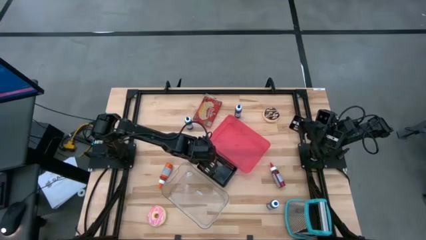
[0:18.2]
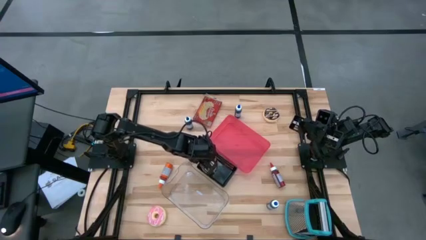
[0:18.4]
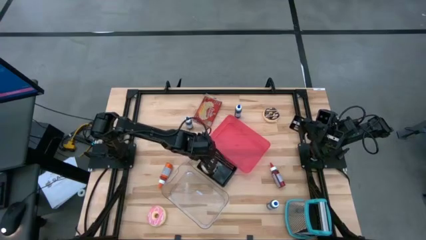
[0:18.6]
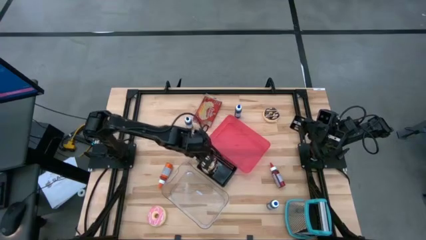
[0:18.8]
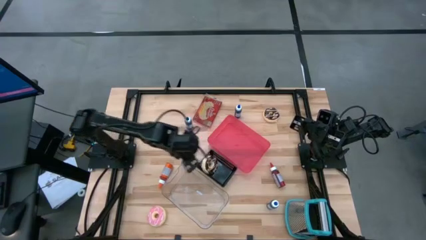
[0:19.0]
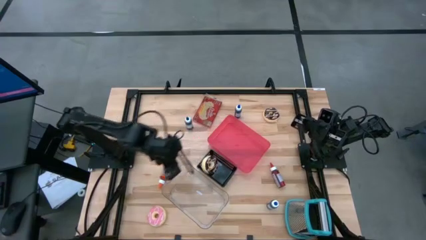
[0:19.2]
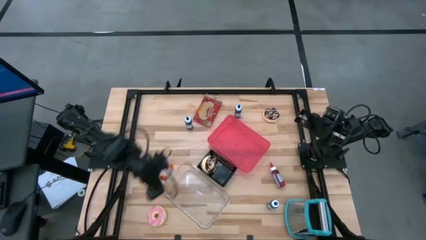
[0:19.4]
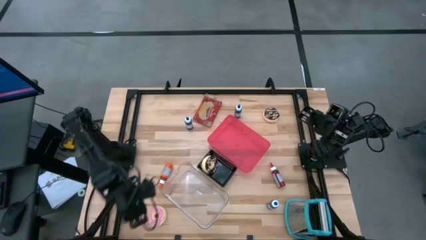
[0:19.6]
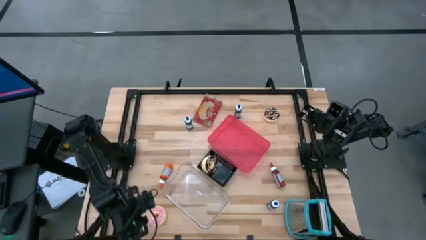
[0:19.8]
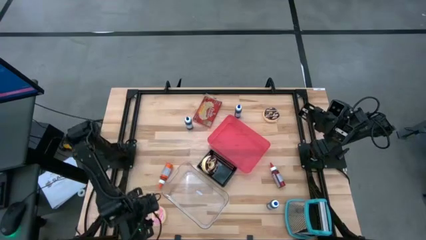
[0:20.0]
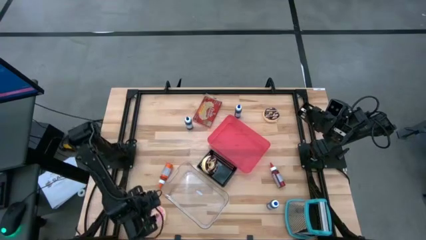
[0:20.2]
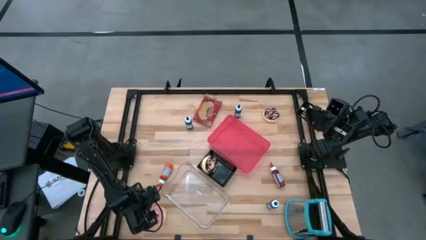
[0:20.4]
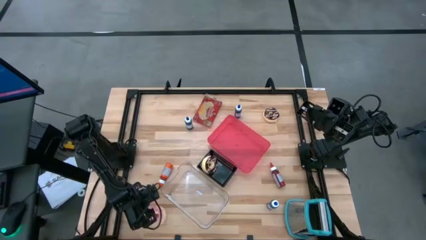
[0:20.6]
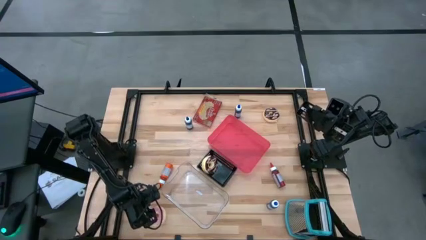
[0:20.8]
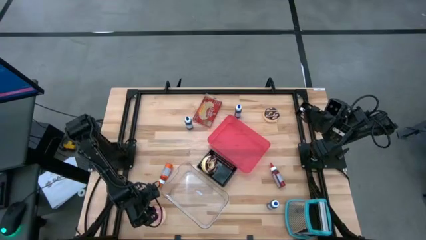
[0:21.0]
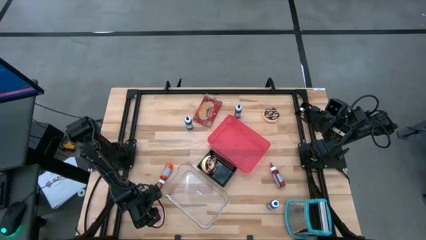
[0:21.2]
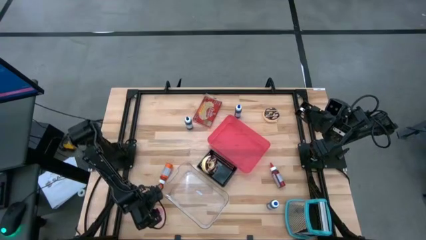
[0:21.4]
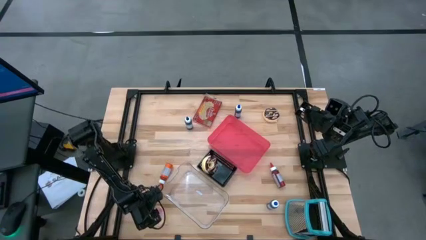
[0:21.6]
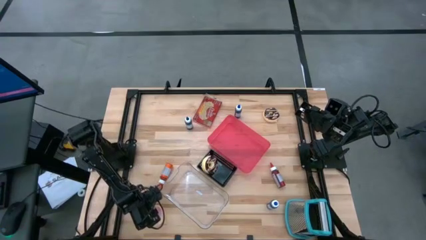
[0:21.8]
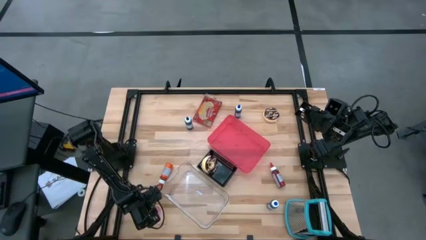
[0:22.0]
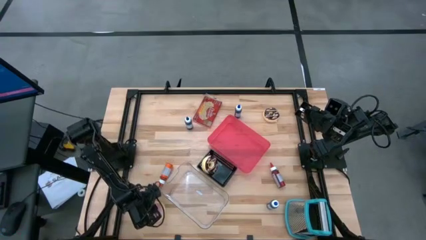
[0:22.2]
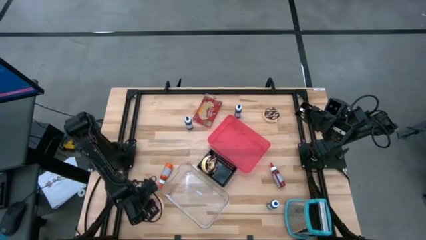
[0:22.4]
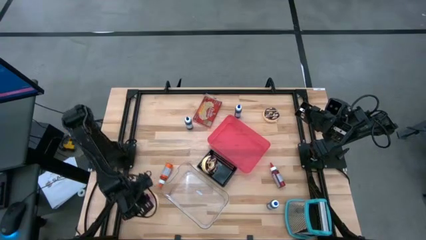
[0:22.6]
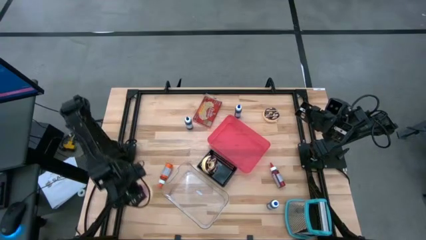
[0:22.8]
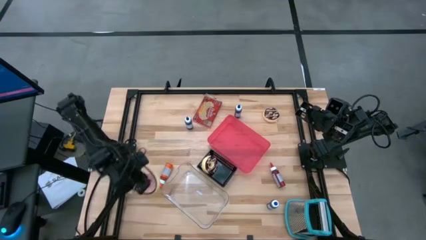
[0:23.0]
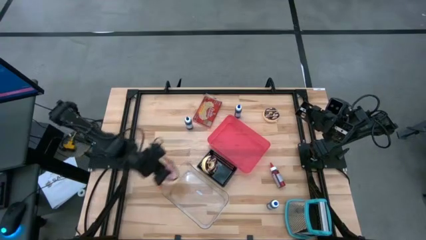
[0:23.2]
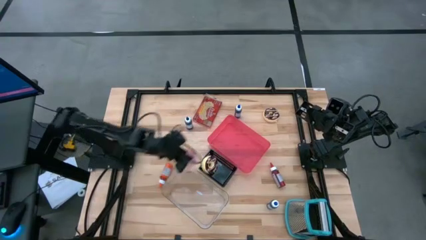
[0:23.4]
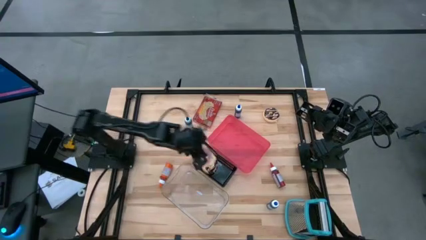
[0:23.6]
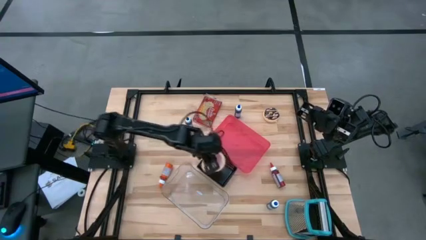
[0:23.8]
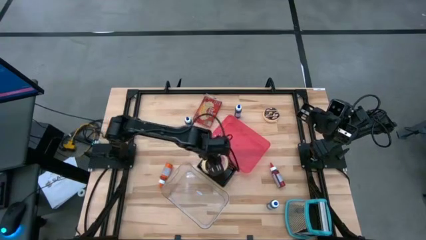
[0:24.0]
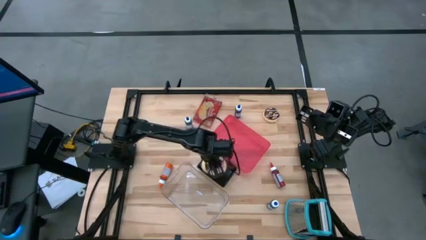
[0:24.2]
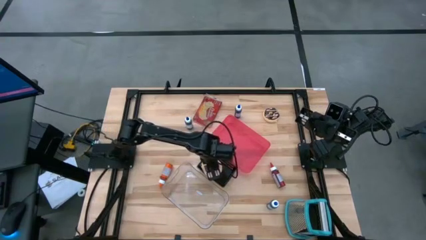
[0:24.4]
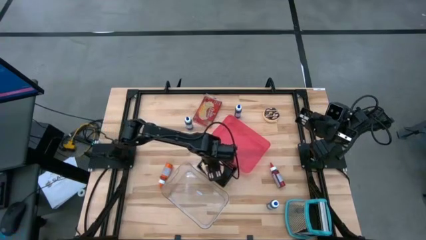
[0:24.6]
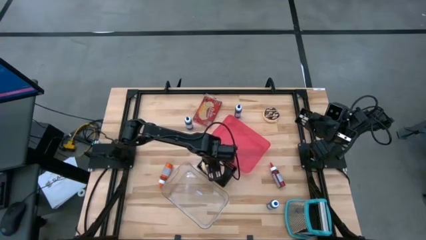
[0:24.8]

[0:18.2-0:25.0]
Put the pink donut into the black bin

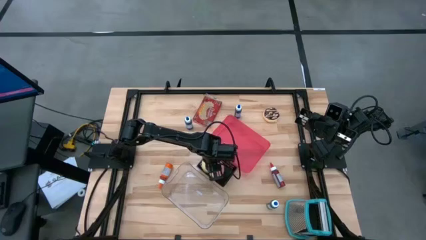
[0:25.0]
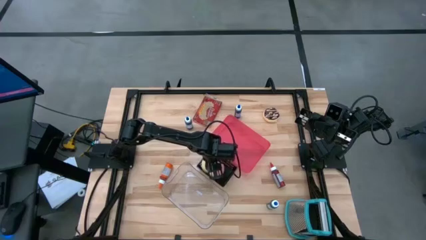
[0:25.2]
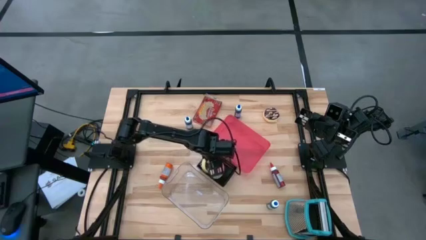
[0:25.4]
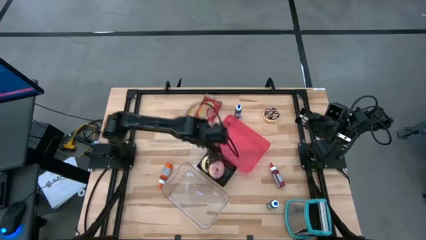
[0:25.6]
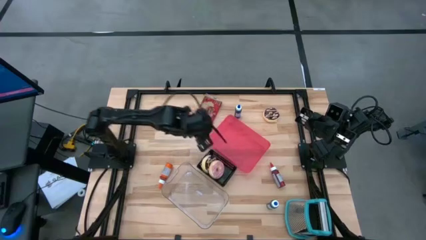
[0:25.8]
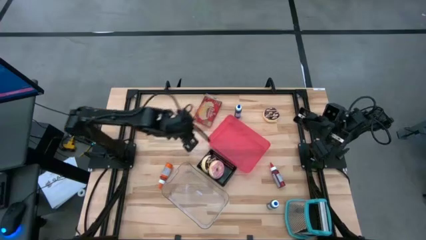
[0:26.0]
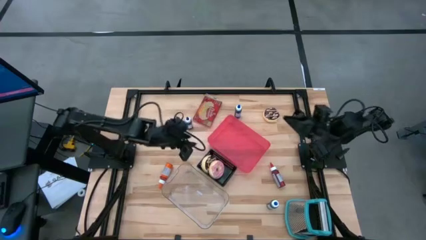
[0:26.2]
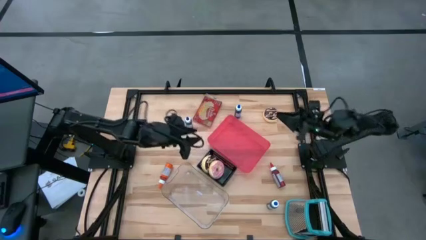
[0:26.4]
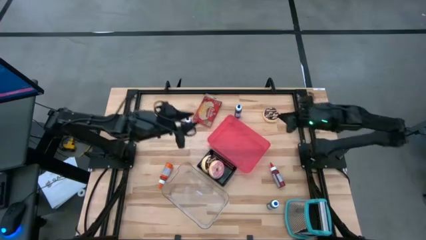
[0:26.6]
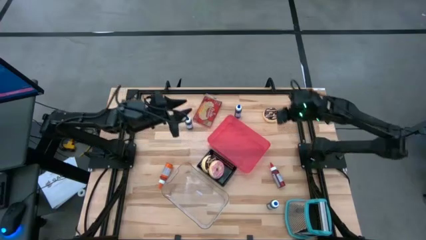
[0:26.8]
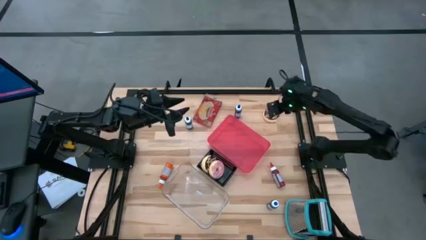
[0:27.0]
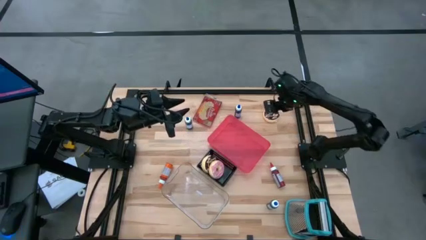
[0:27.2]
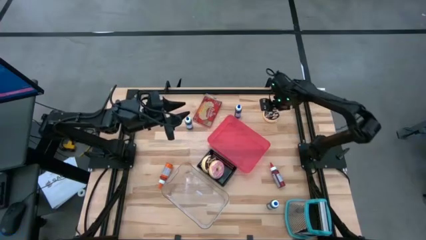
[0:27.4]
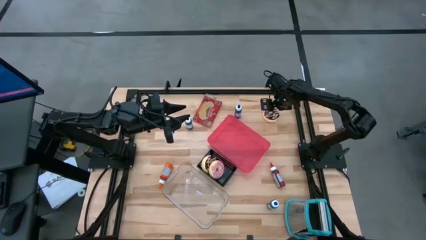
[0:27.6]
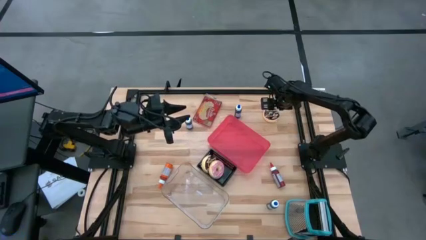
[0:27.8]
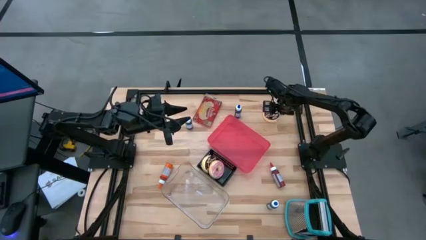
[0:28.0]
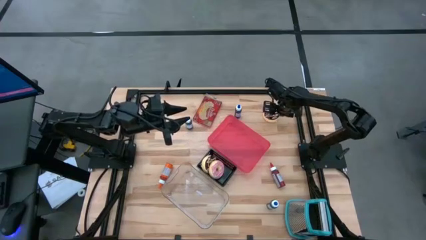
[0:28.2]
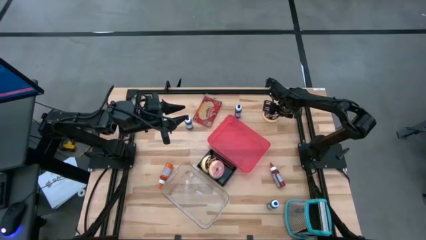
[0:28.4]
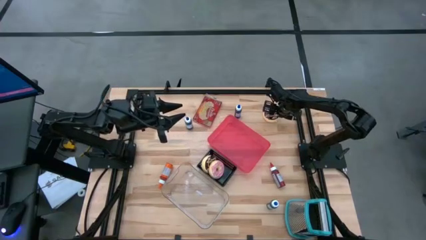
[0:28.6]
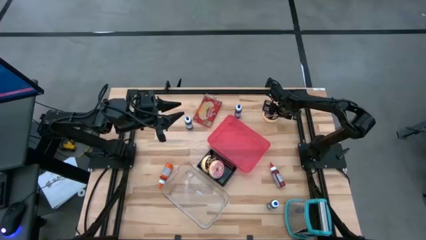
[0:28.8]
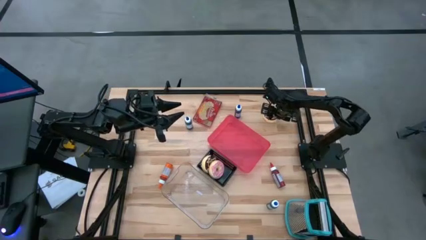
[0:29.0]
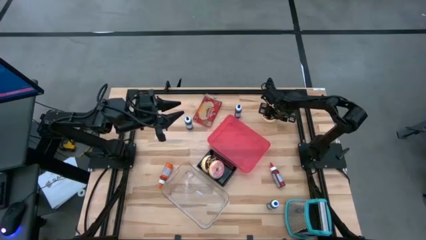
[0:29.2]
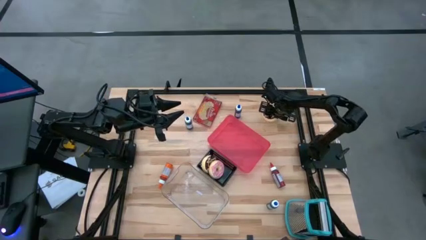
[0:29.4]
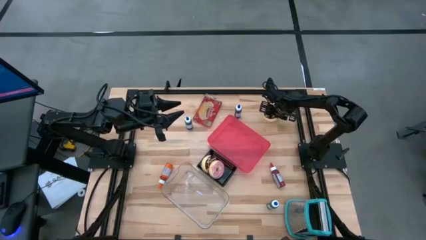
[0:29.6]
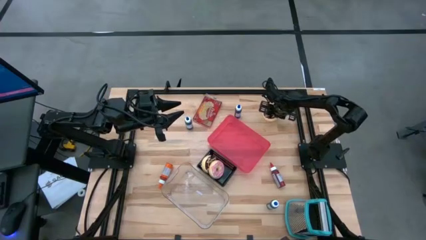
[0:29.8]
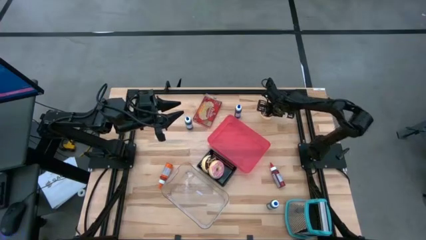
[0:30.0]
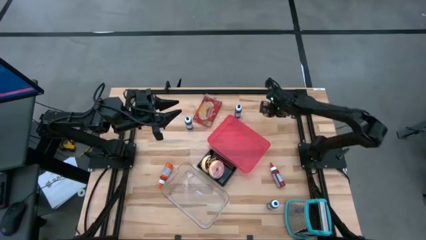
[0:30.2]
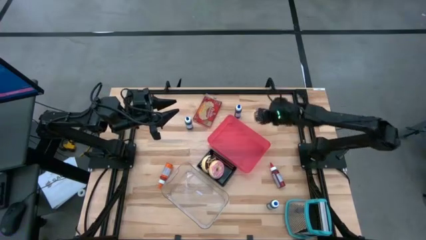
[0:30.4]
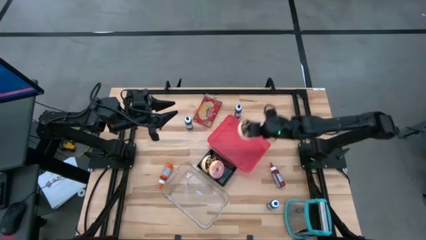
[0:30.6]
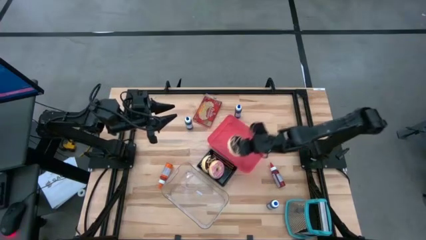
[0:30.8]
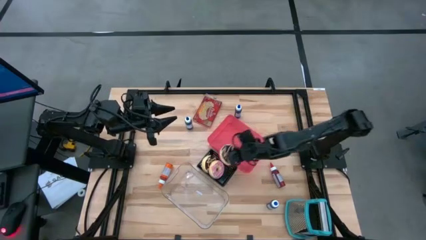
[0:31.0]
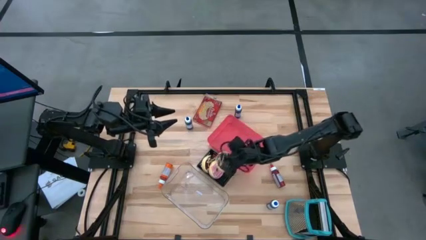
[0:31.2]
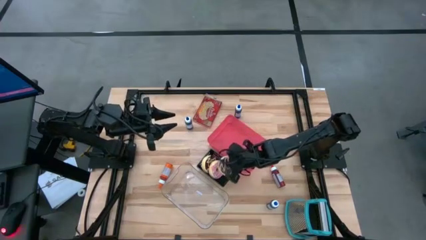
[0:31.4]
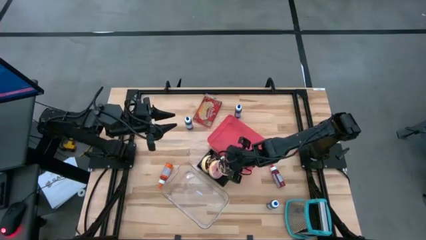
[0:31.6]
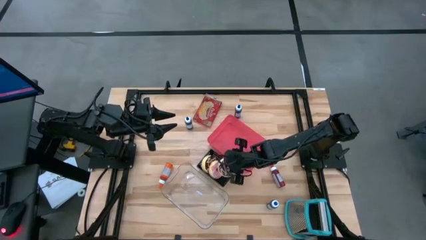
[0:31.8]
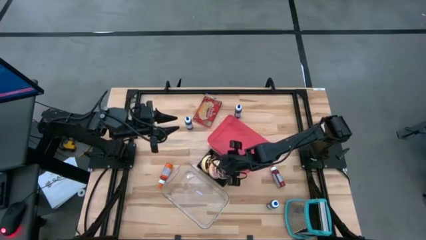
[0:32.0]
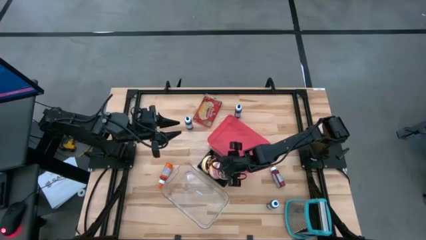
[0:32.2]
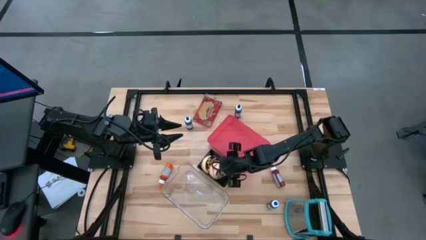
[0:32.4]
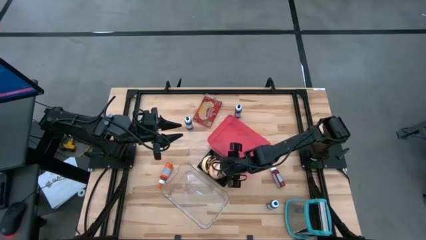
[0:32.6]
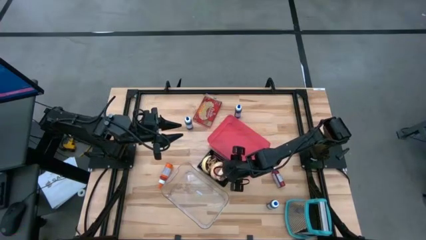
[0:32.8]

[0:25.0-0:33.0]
Put the black donut into the black bin
